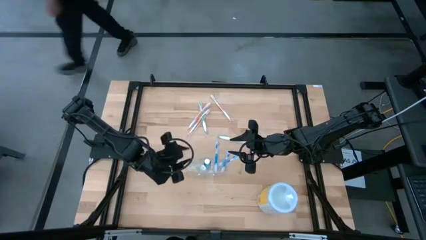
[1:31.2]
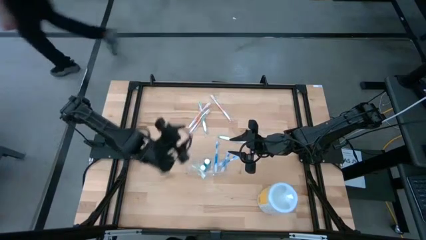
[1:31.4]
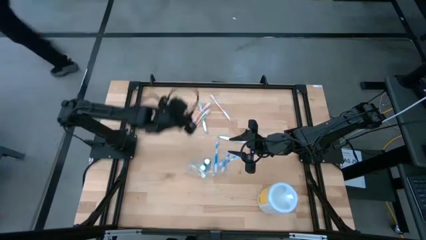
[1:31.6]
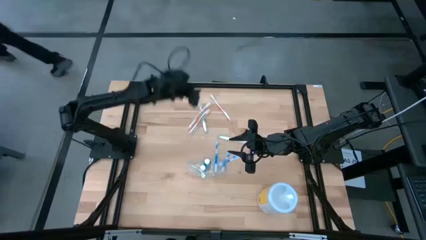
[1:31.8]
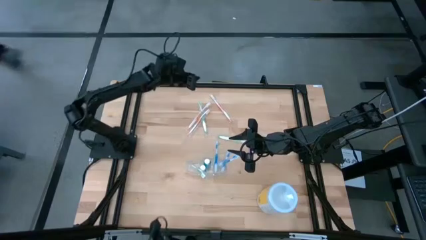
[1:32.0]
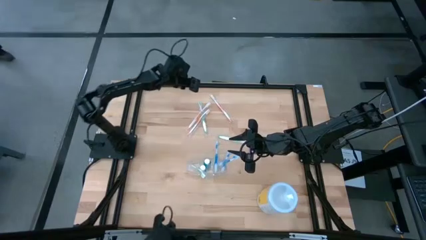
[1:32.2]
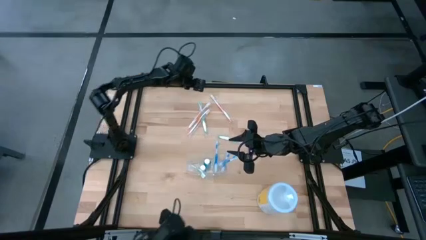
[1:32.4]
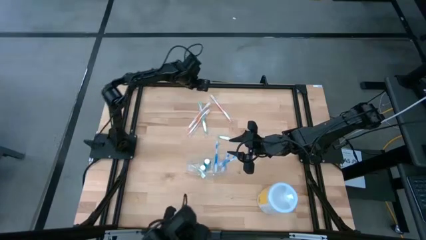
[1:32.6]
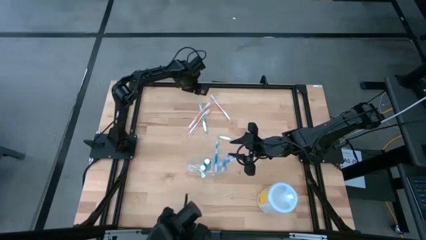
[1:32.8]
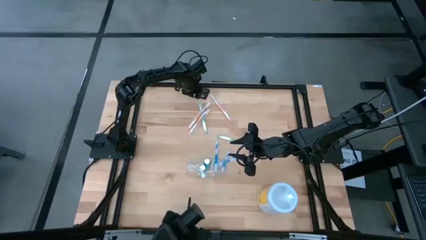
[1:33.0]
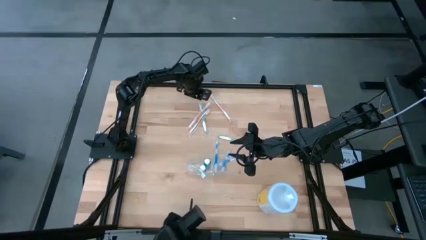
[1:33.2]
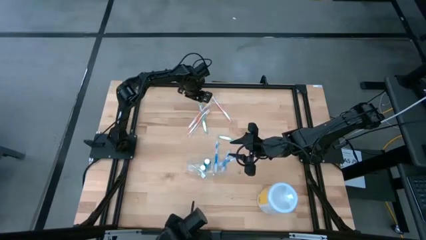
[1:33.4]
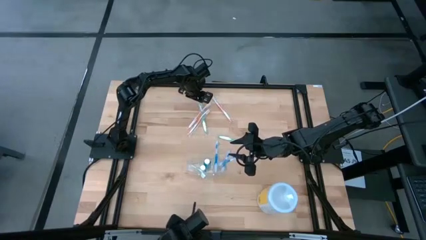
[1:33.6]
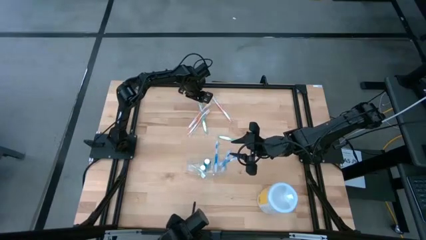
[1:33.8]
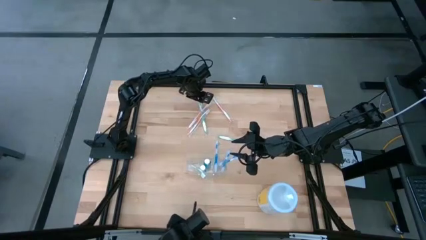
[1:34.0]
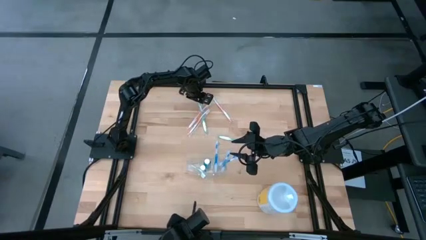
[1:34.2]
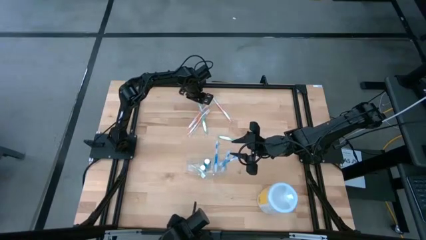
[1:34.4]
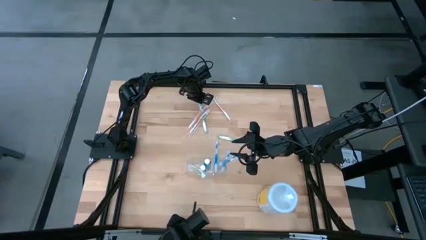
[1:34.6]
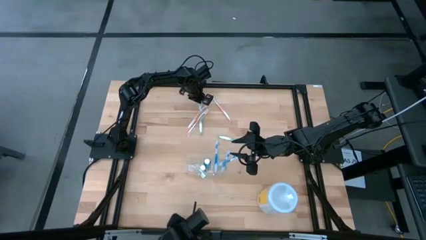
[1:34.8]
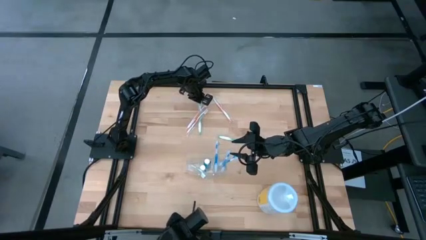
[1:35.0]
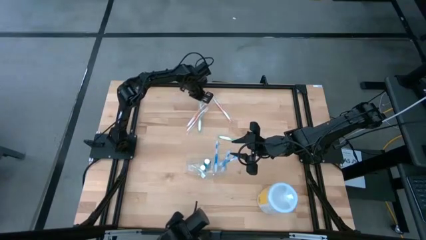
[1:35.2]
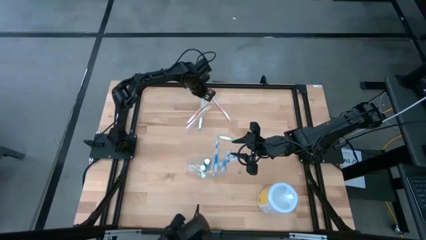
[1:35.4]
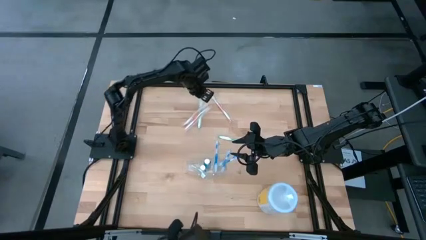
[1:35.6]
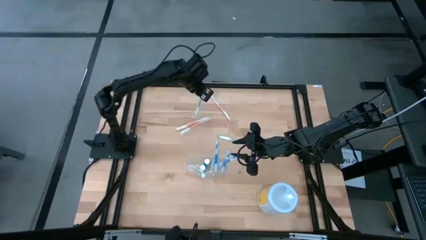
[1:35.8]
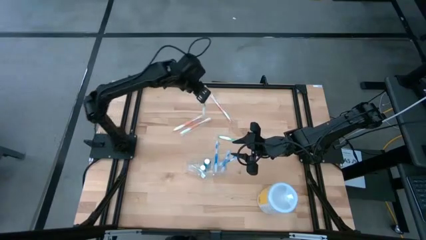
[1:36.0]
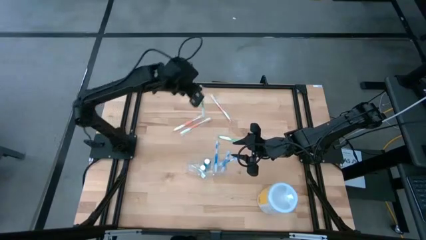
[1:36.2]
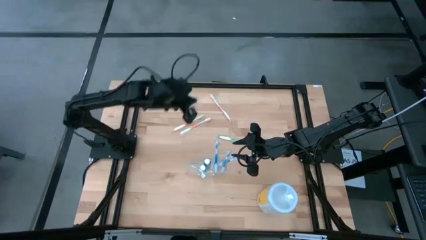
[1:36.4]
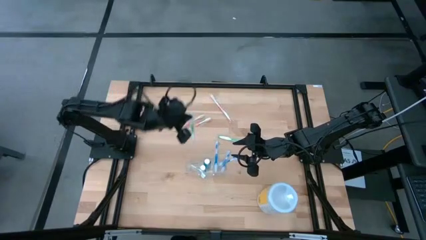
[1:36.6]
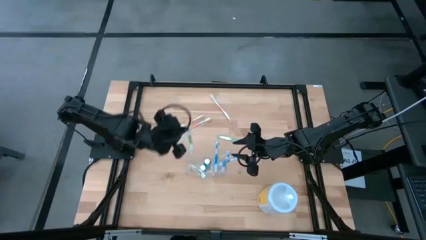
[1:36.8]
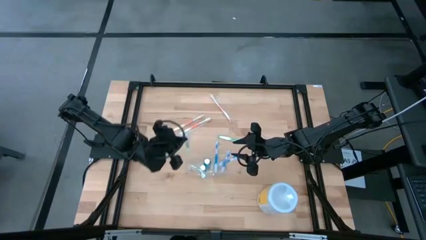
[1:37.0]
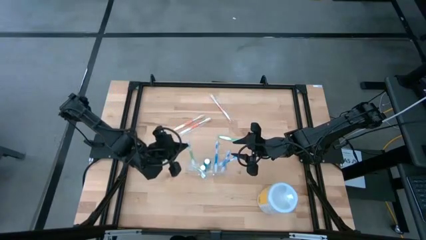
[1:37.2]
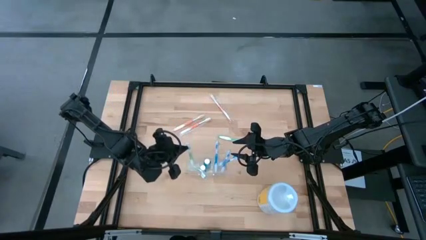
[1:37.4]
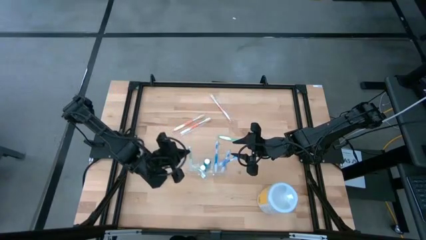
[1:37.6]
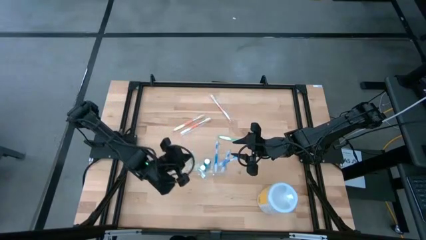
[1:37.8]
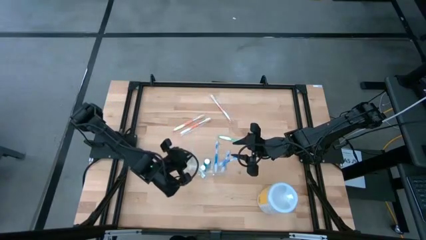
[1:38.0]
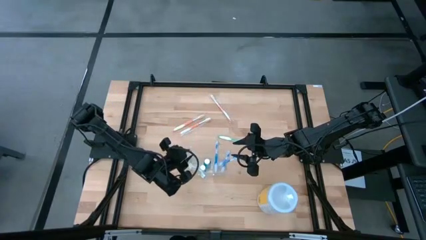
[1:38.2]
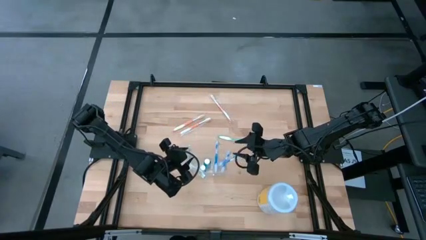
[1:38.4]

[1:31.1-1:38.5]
Task: Pick & Place toothbrushing station
Put the green toothbrush into the transparent organizer

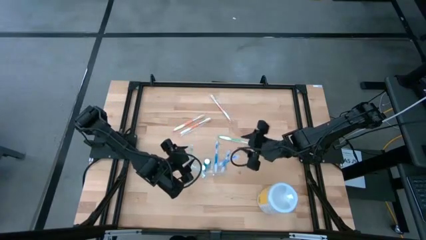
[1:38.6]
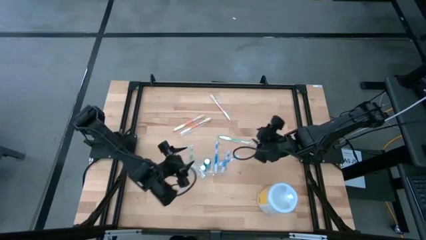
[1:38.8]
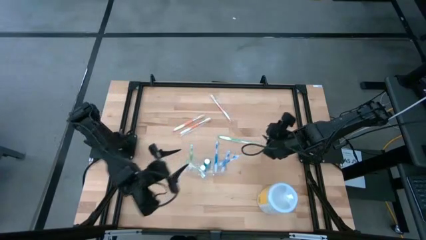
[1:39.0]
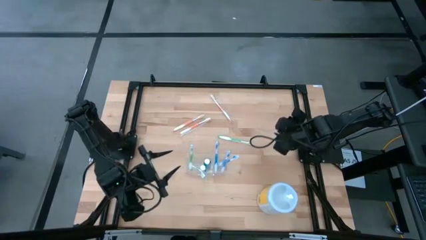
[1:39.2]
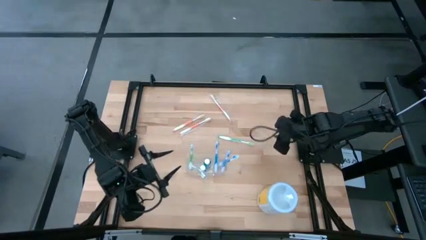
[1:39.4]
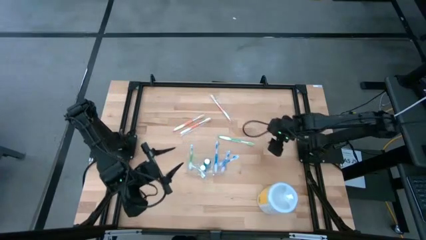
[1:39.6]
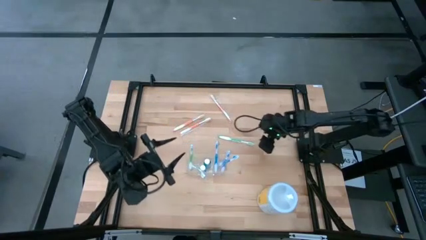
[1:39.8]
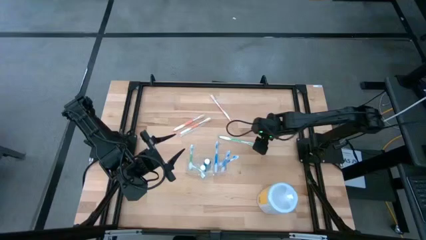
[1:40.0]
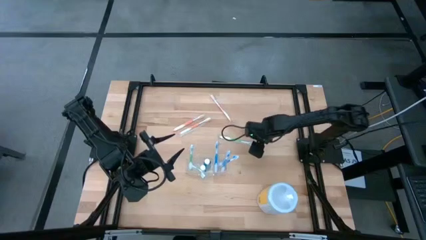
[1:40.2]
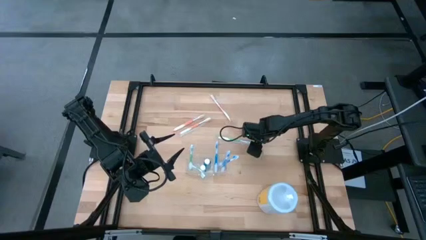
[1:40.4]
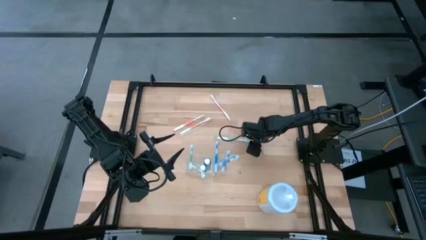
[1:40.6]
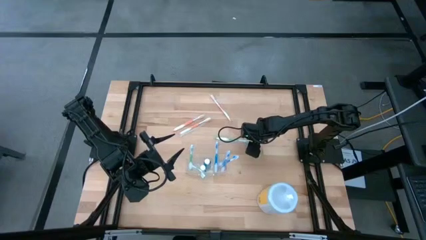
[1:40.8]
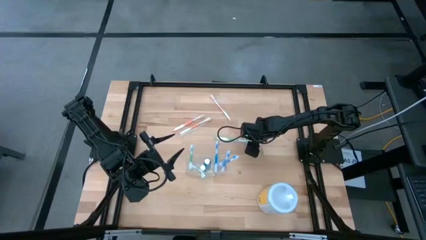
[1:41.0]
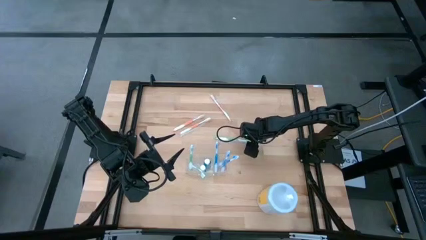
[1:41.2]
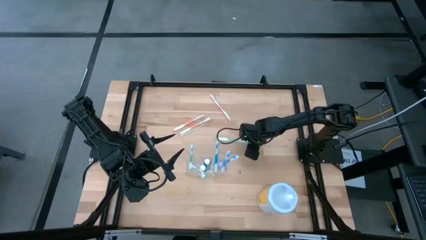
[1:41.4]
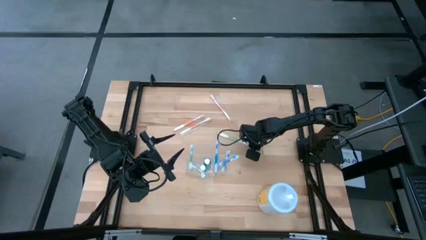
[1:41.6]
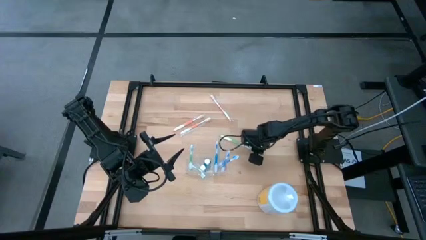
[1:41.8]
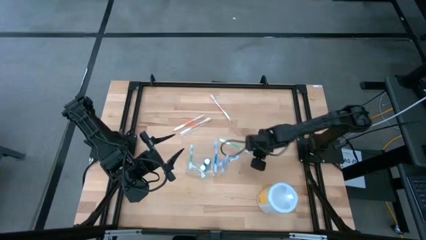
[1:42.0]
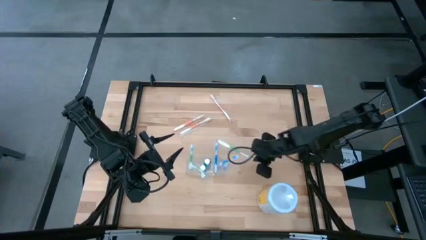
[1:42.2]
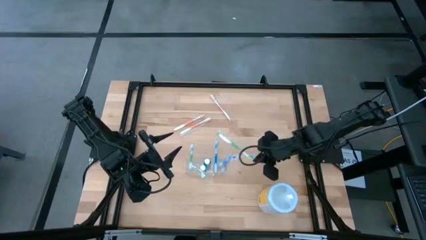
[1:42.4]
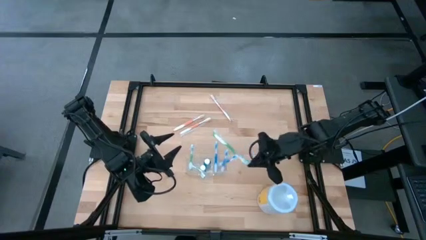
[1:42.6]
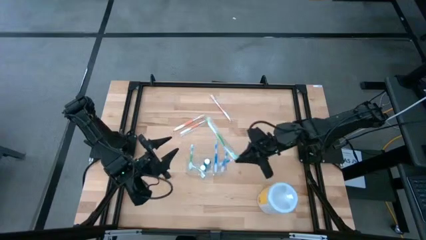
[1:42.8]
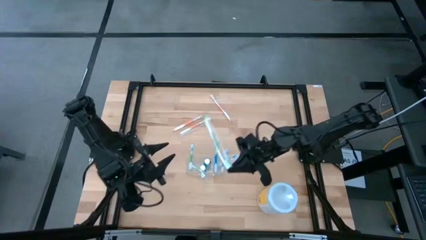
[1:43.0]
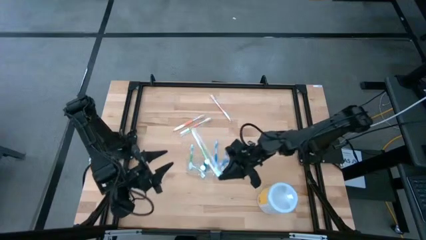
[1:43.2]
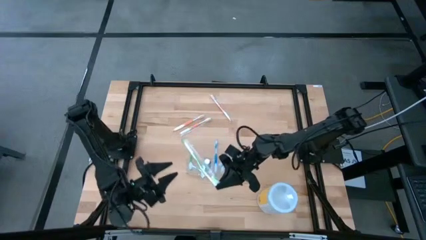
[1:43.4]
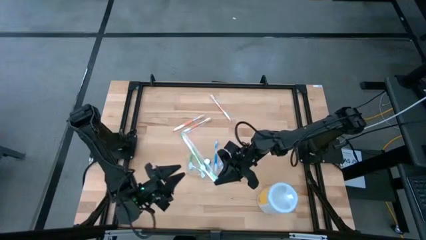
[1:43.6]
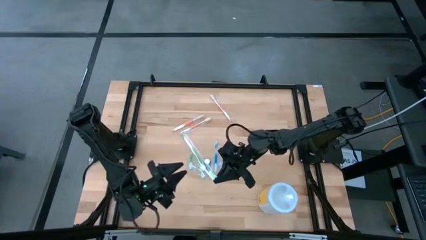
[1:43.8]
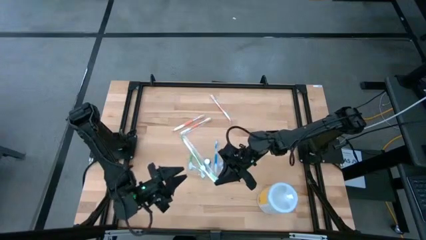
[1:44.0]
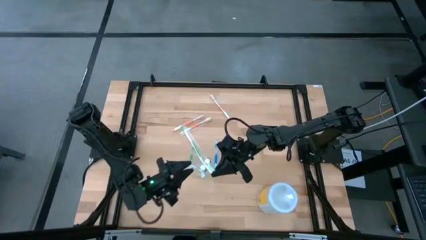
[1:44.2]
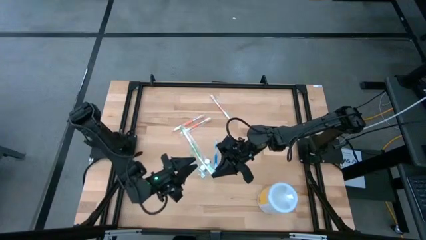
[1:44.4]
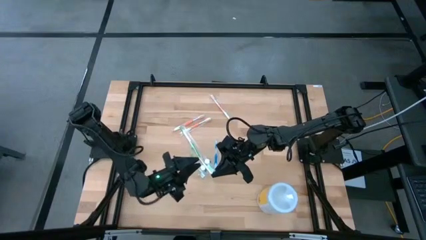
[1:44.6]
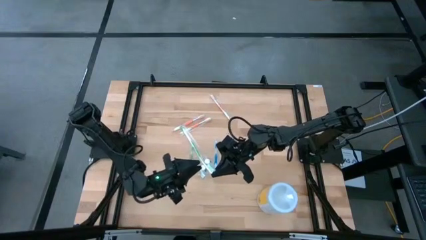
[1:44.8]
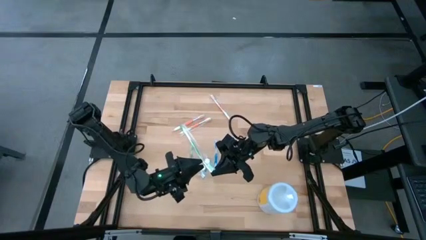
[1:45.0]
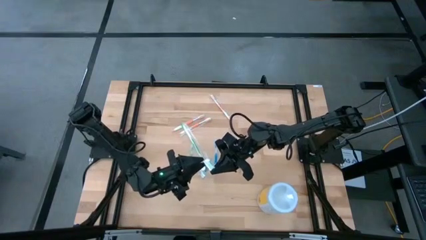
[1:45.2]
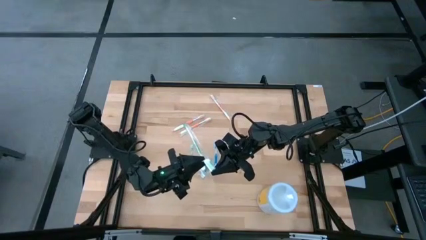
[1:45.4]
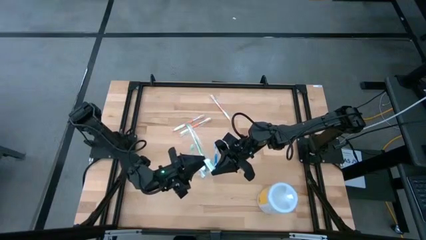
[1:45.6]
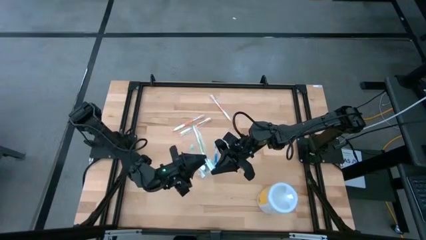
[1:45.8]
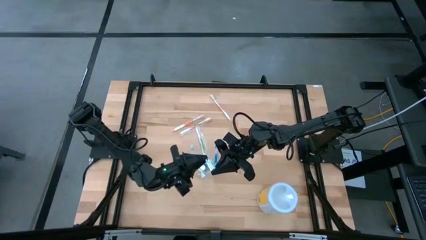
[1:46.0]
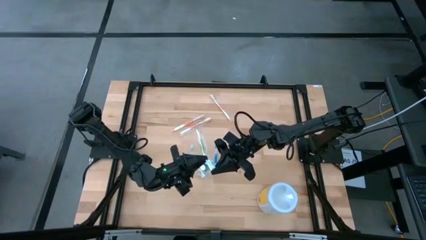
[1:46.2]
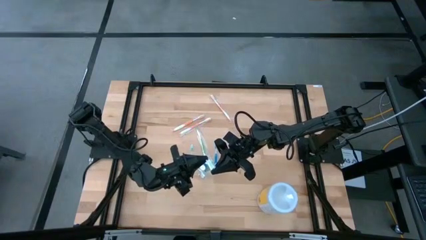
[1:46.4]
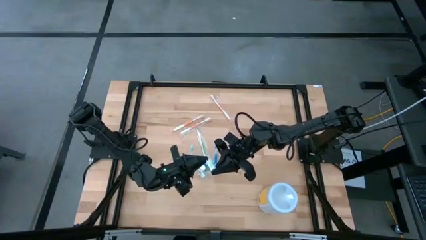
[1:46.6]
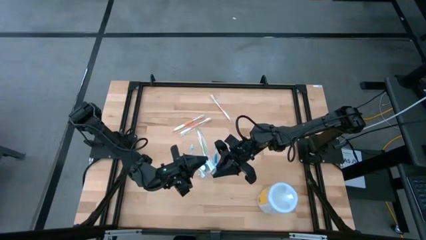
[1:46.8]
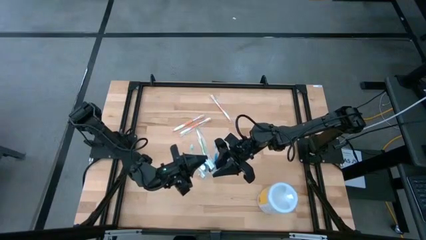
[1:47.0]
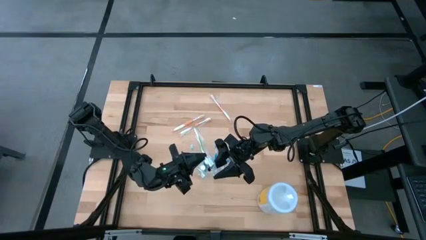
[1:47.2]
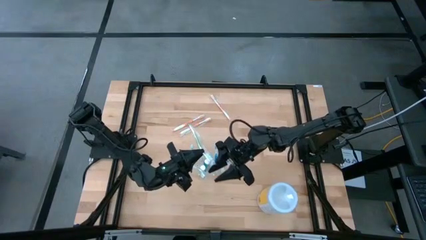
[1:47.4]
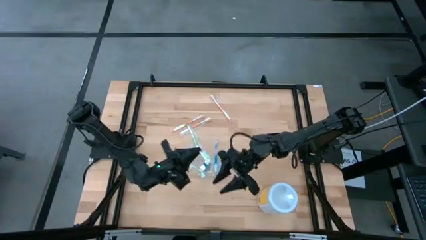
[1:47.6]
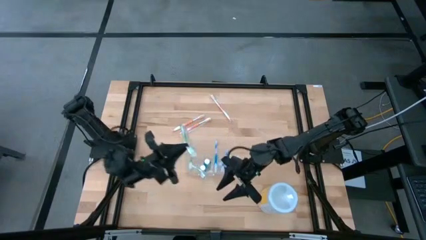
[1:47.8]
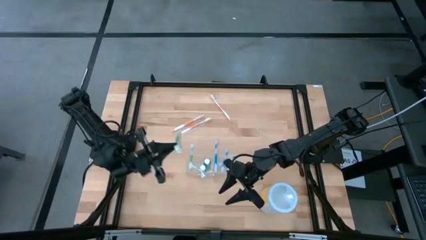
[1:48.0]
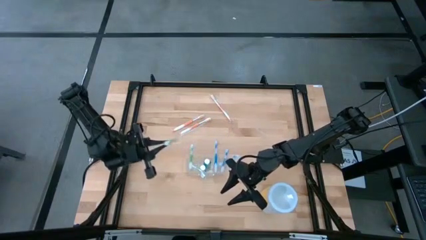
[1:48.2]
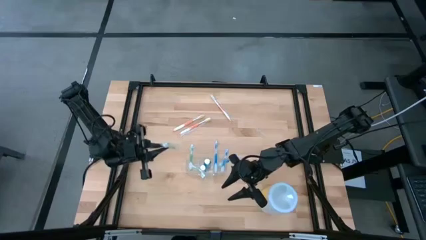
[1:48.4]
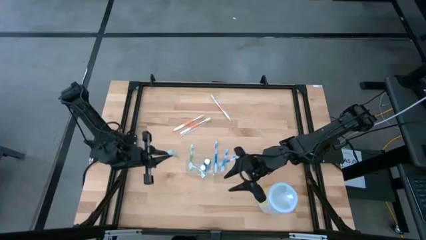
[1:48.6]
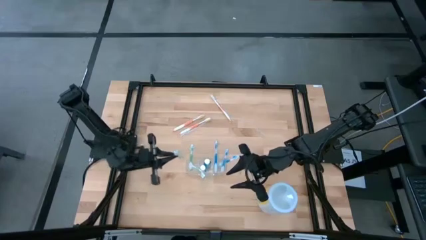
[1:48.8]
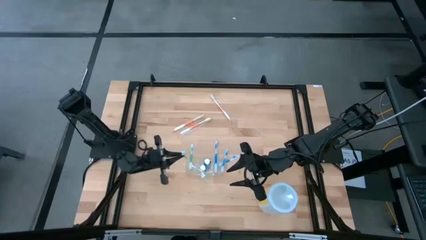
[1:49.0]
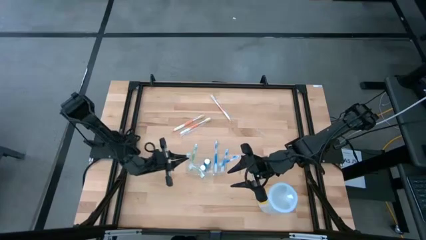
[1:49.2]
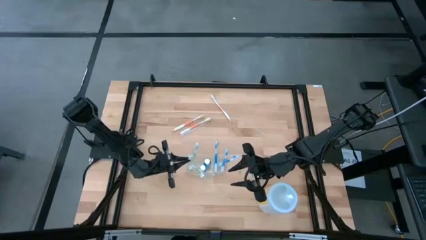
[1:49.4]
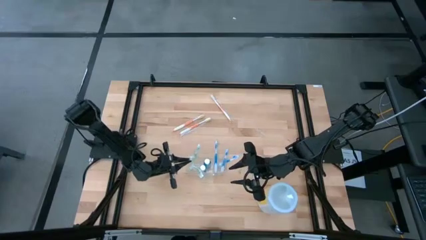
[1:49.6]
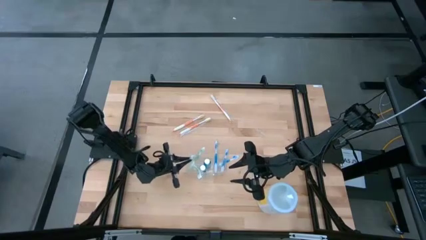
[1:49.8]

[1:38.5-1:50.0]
Put the green toothbrush into the transparent organizer
